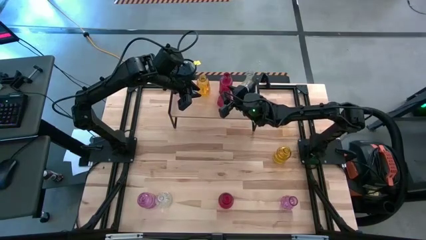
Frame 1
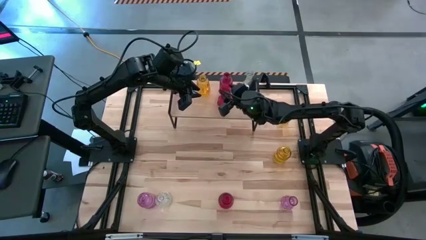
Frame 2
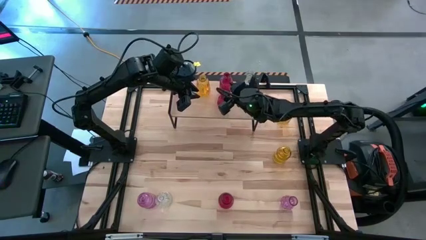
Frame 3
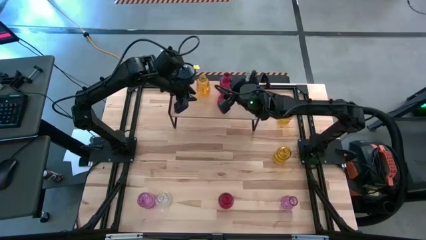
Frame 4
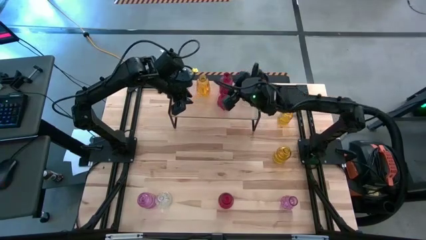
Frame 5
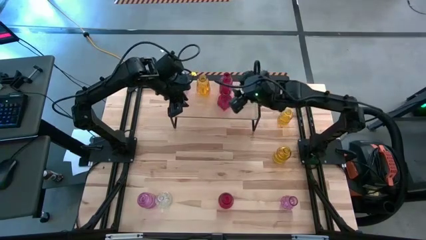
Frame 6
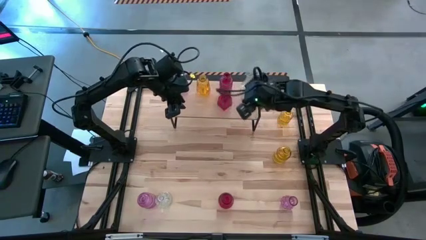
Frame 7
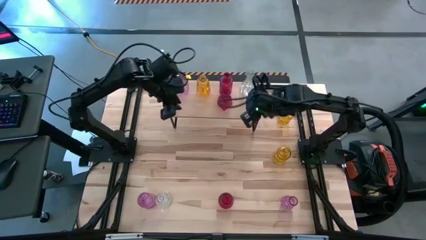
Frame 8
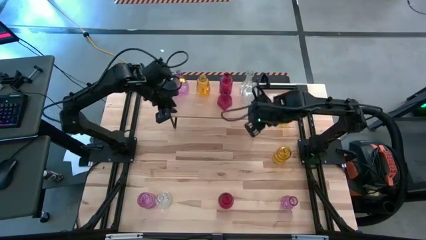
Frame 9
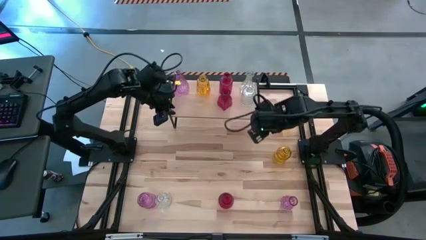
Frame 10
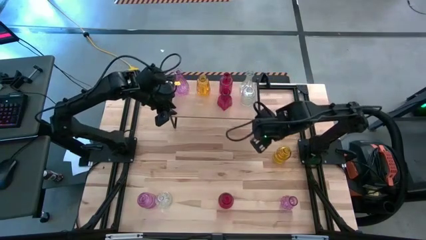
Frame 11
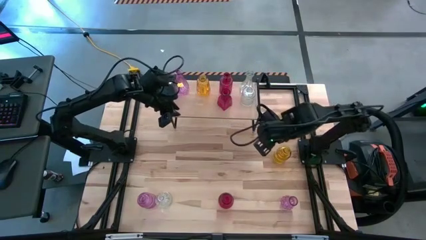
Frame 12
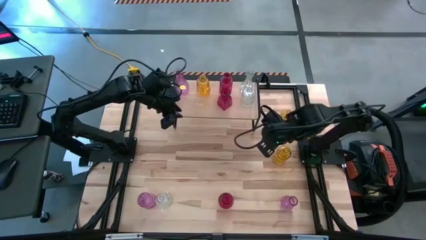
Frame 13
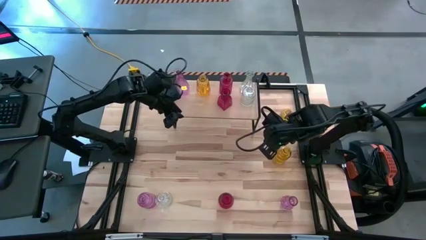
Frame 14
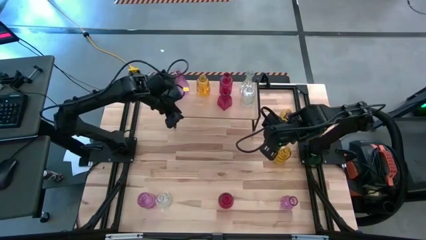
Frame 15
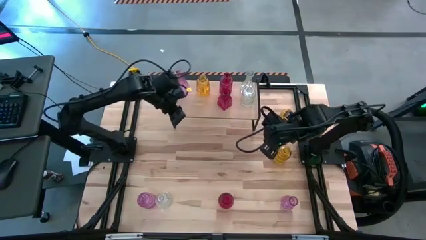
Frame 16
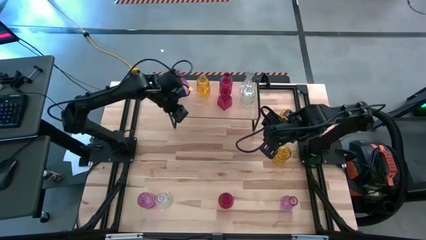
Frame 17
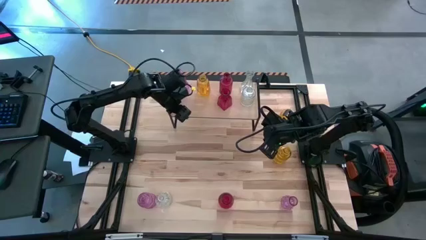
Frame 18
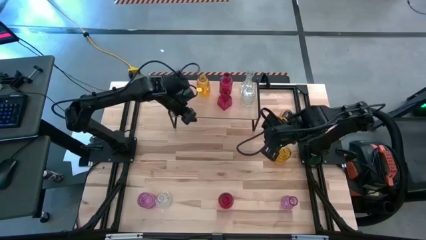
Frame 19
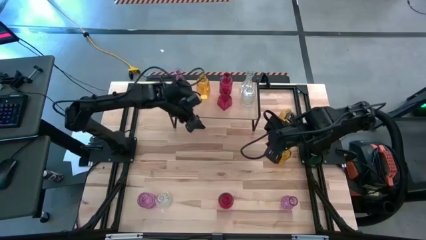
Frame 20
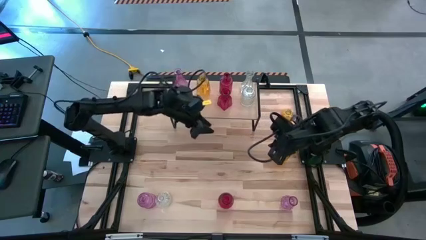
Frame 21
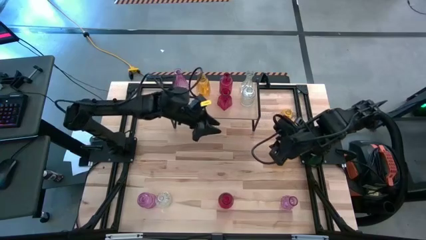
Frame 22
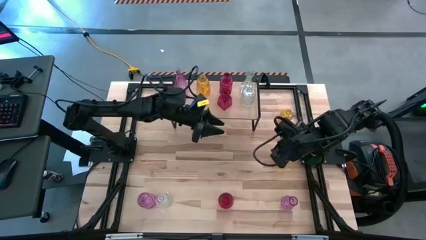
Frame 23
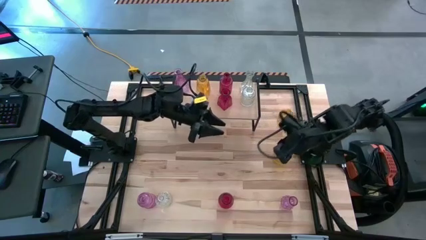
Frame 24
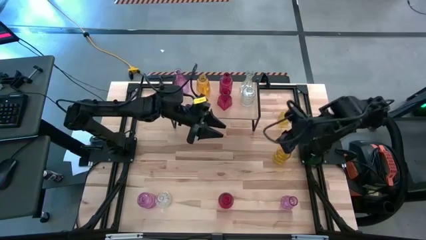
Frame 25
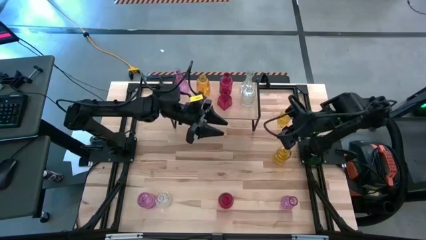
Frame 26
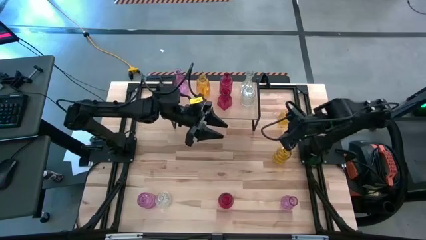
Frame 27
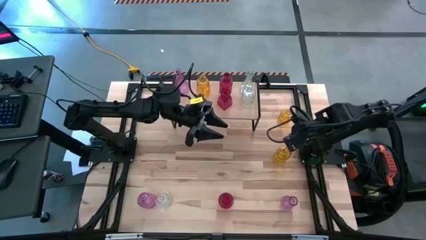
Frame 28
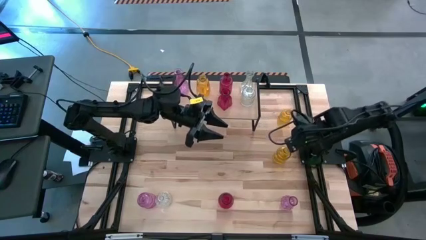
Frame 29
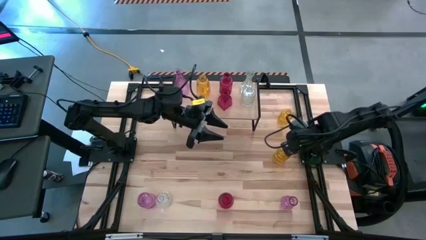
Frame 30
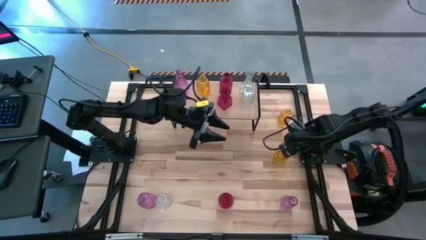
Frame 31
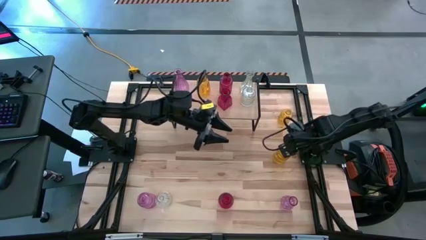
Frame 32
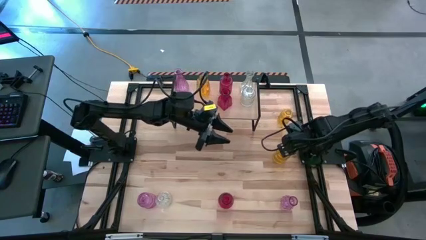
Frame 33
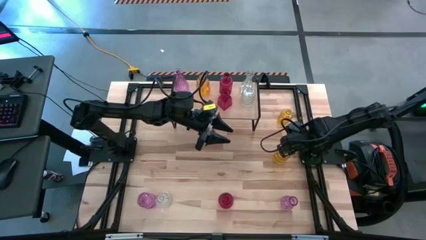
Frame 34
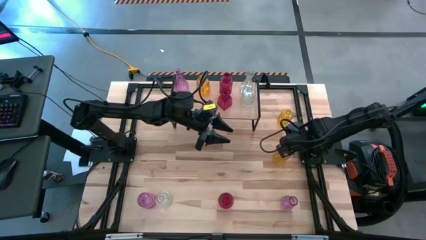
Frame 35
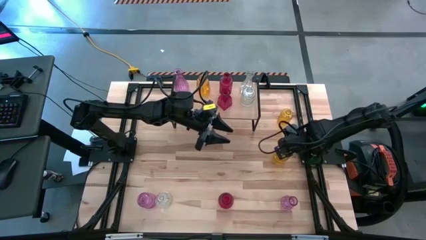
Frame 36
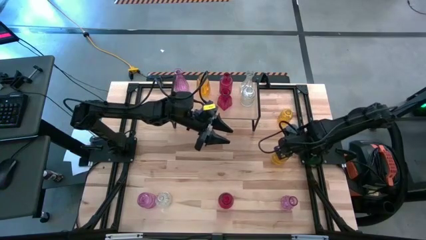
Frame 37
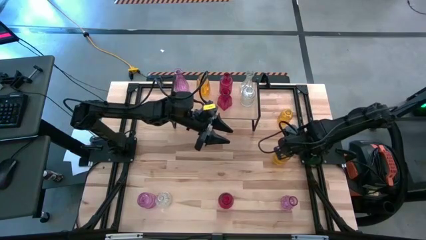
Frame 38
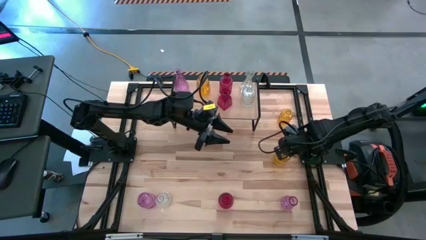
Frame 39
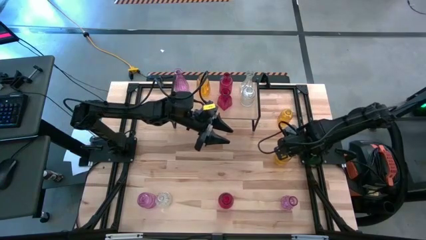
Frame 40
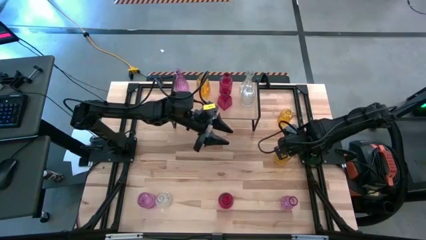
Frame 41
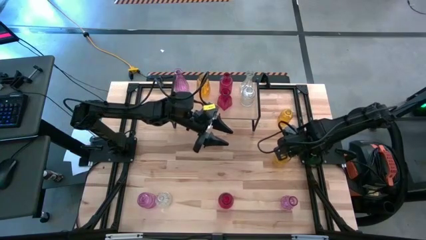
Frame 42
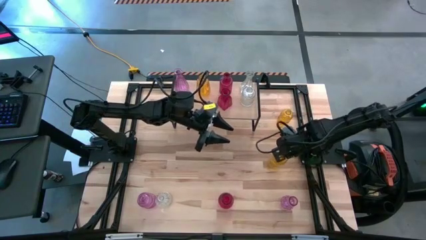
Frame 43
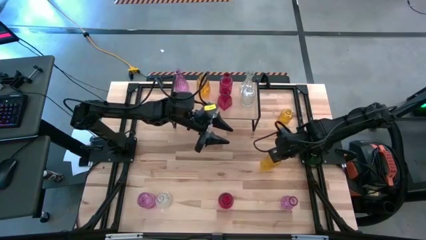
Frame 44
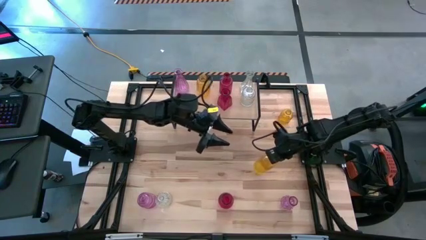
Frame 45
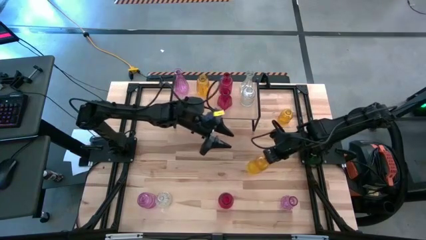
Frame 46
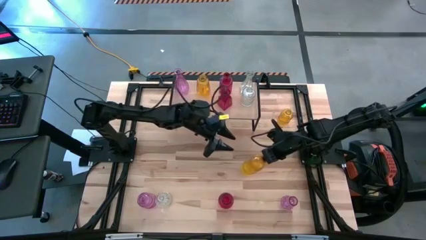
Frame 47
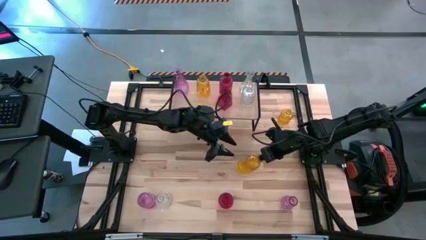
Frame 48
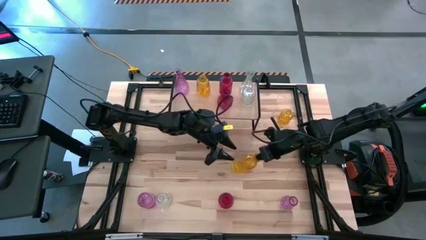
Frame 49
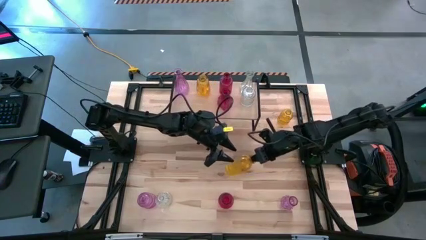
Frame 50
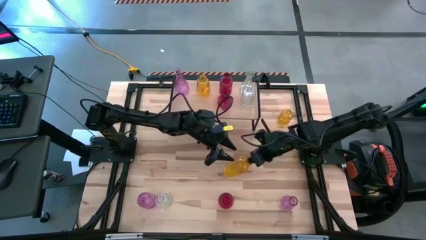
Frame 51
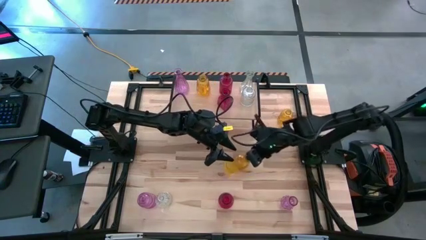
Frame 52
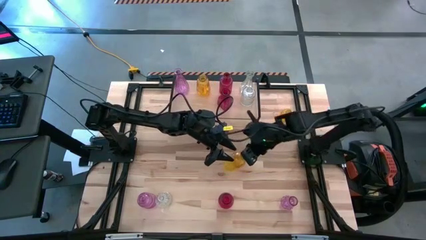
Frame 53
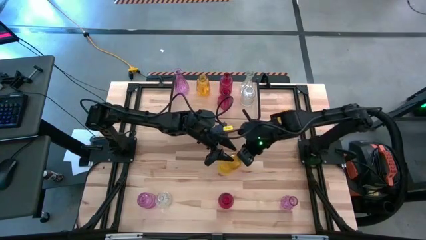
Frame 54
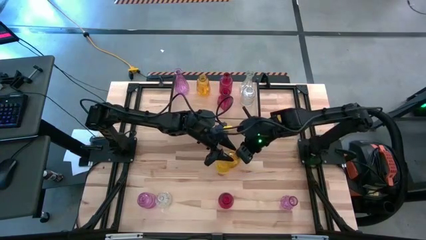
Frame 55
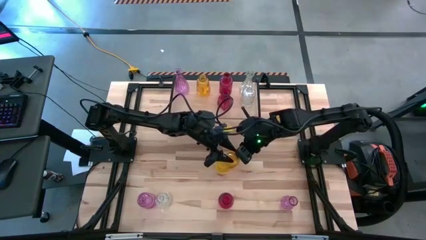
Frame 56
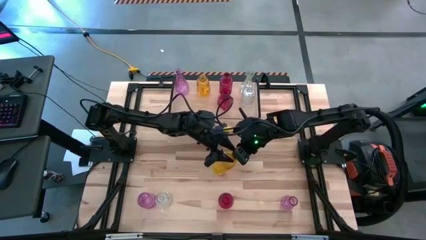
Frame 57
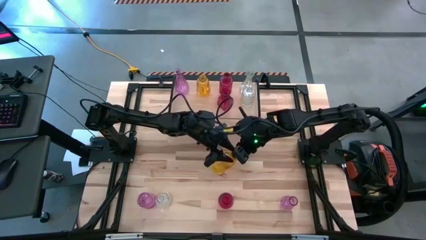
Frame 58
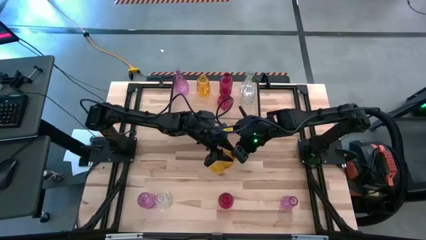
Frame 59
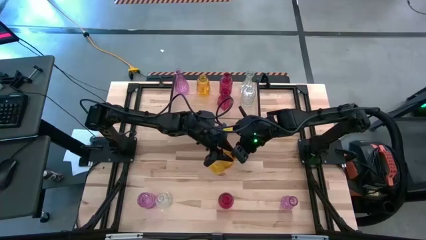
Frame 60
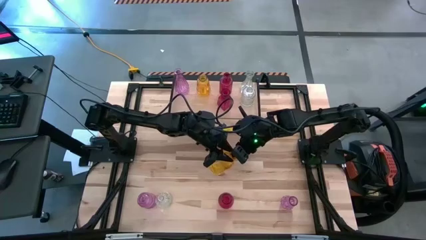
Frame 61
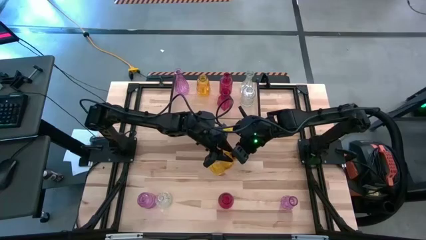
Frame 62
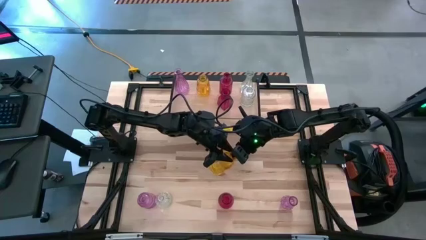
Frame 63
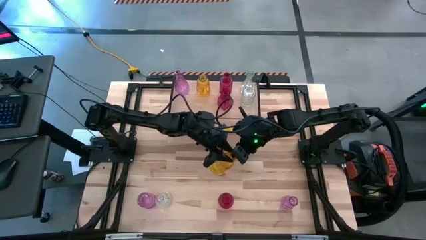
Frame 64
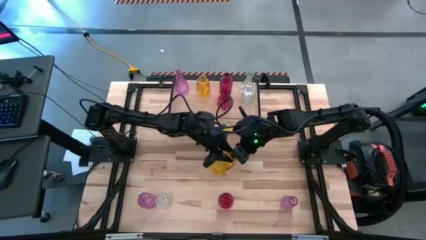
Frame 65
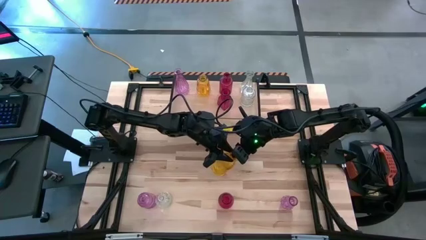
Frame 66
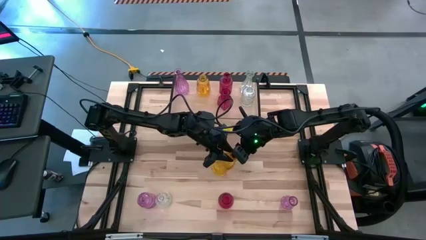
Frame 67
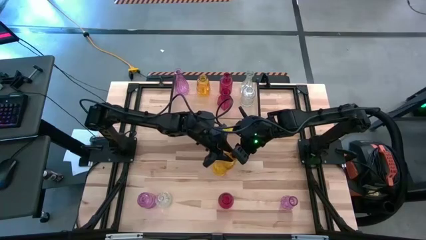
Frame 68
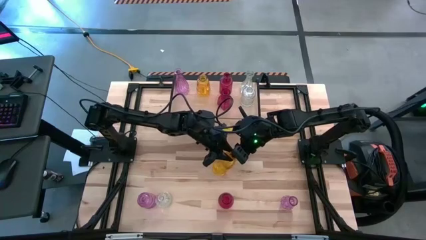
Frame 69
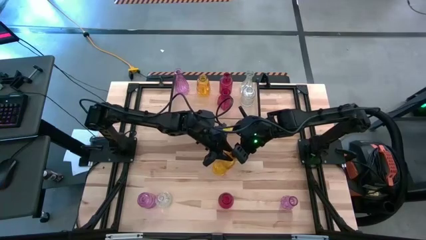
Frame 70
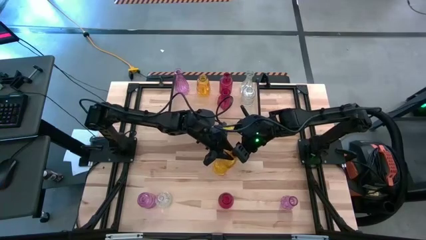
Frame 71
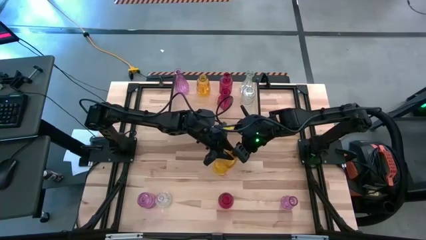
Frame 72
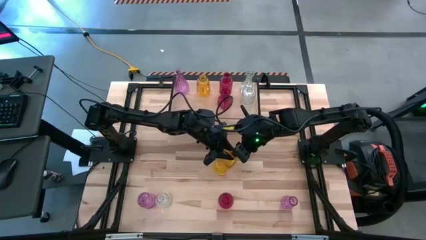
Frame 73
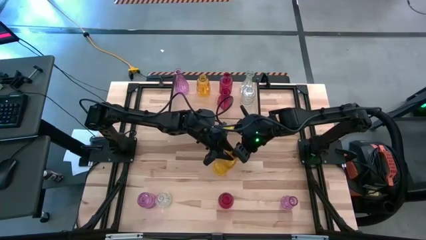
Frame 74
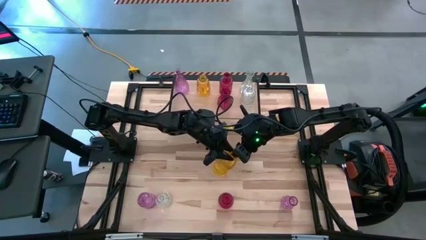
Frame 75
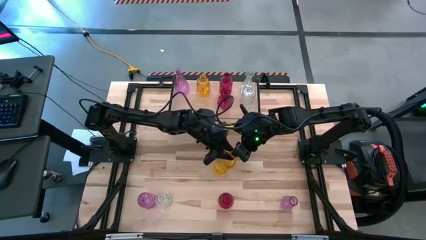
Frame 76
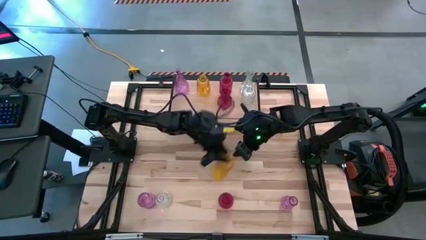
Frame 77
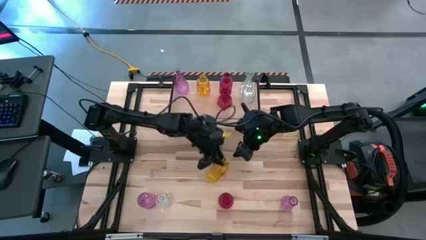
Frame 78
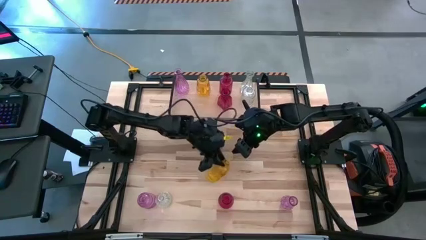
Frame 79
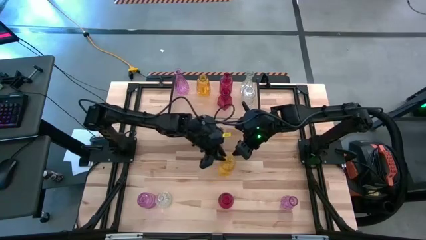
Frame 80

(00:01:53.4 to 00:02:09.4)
Task: sort vases onto shelf
Put the bottom yellow vase on the shelf and align it with the other yellow vase
